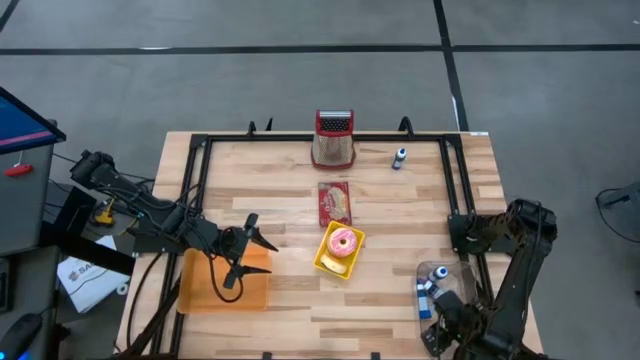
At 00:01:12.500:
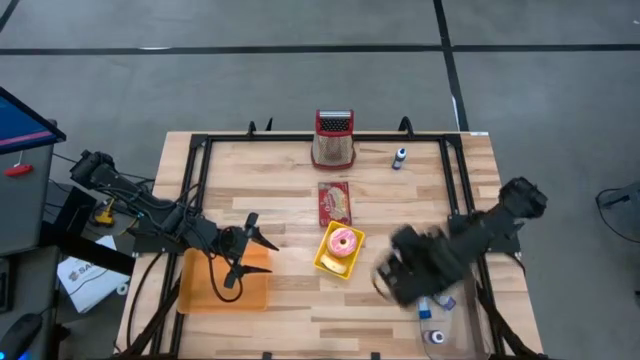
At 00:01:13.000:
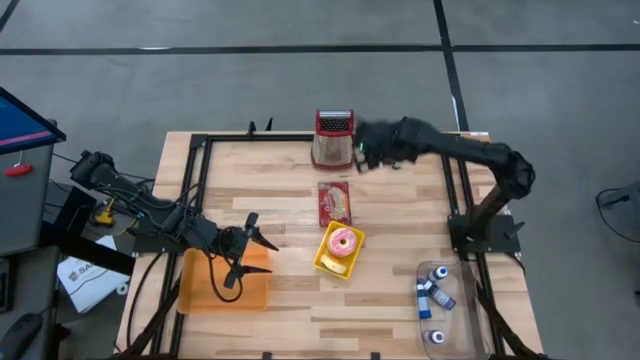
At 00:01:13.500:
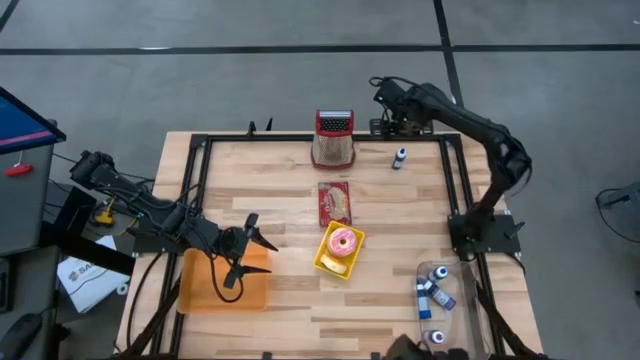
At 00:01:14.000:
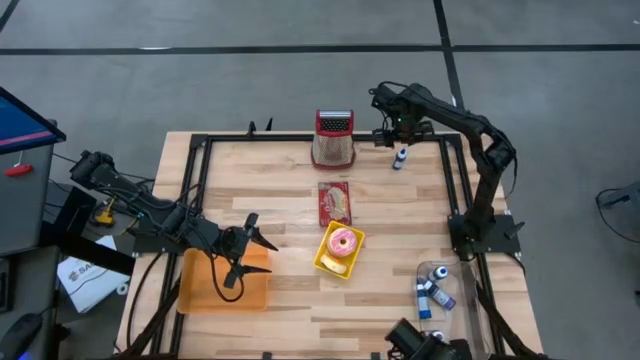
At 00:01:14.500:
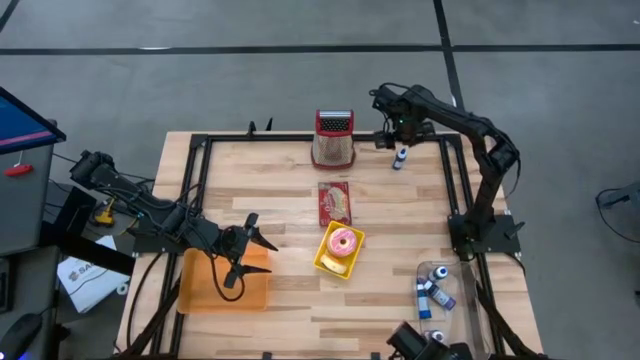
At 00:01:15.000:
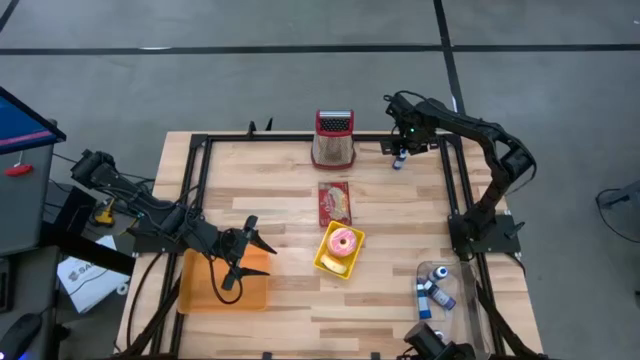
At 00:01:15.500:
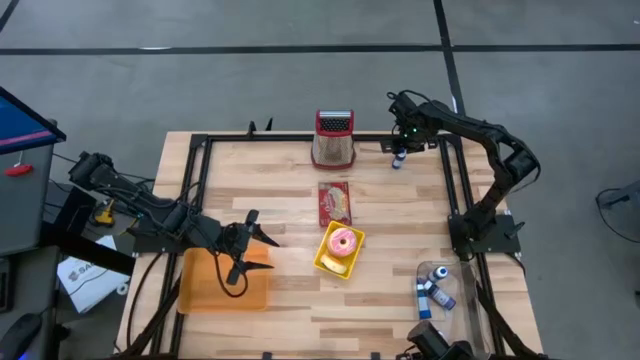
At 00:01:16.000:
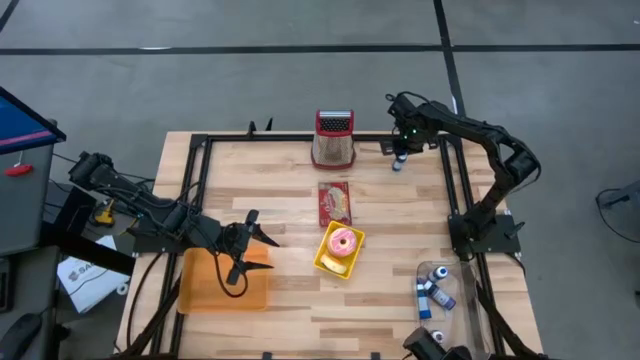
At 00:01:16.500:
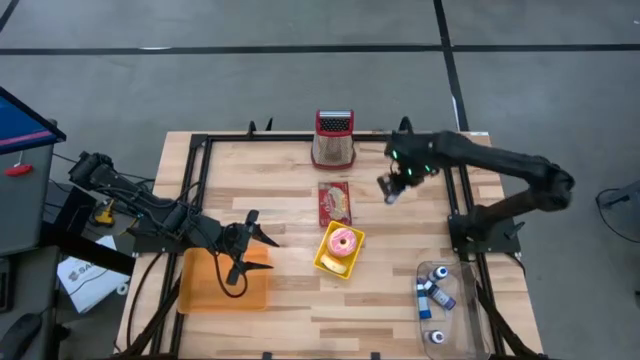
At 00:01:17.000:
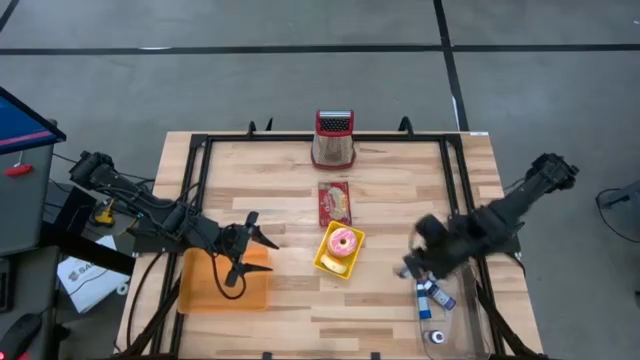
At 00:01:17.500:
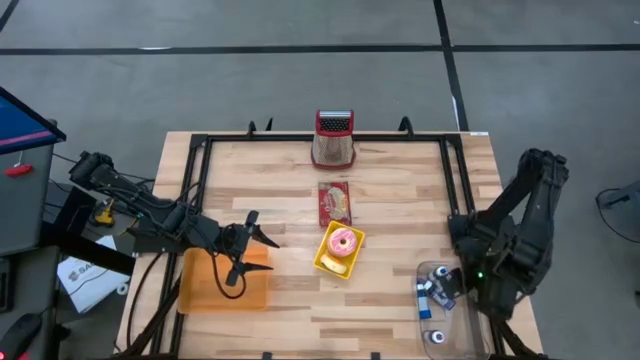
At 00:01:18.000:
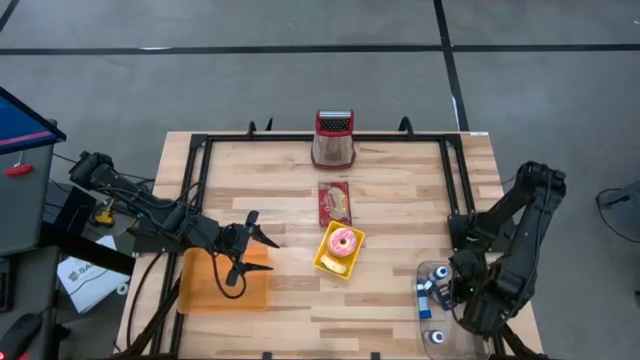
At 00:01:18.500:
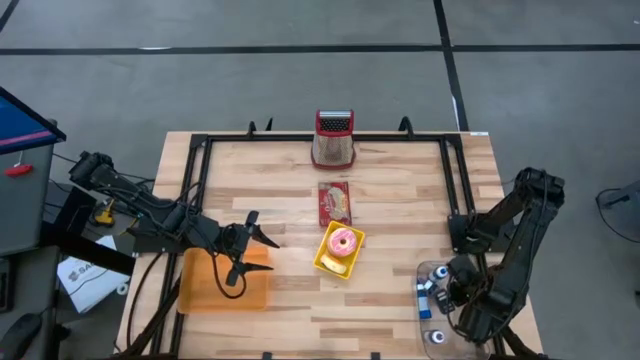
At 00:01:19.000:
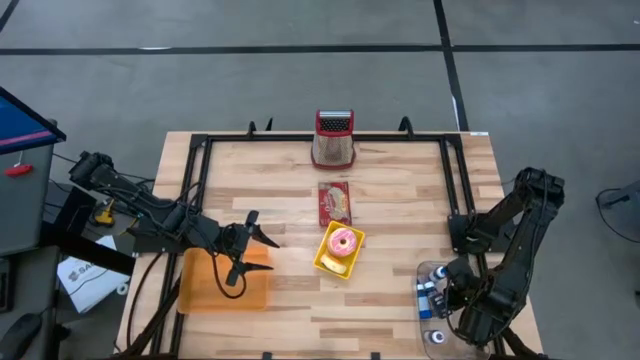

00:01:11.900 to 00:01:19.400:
Put the blue food coloring bottle into the transparent bin

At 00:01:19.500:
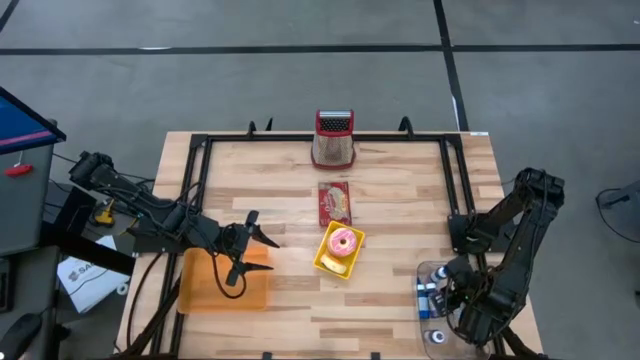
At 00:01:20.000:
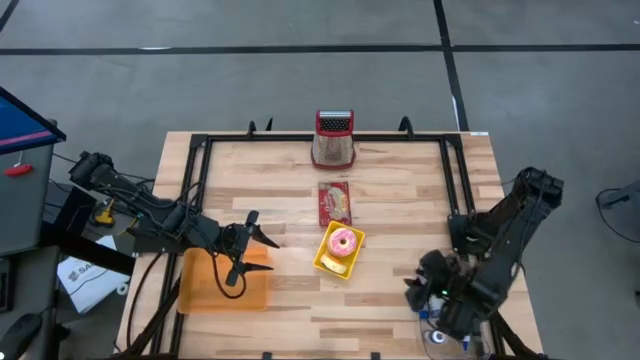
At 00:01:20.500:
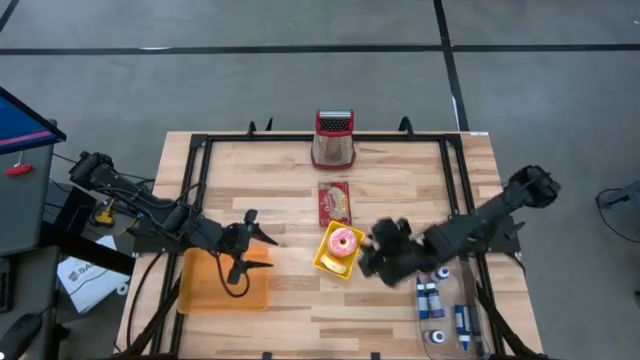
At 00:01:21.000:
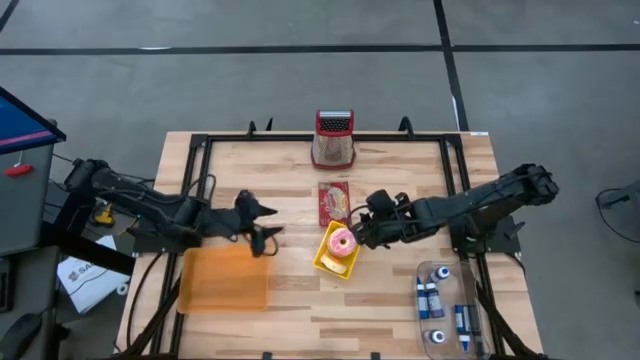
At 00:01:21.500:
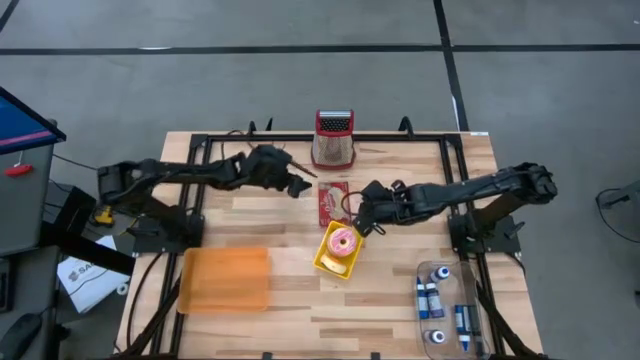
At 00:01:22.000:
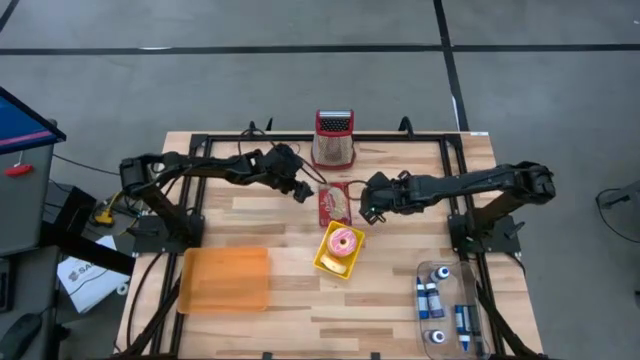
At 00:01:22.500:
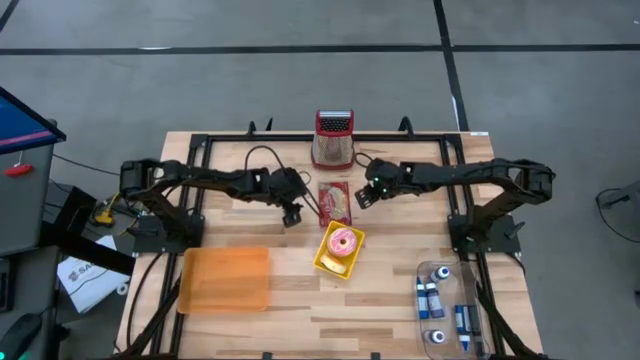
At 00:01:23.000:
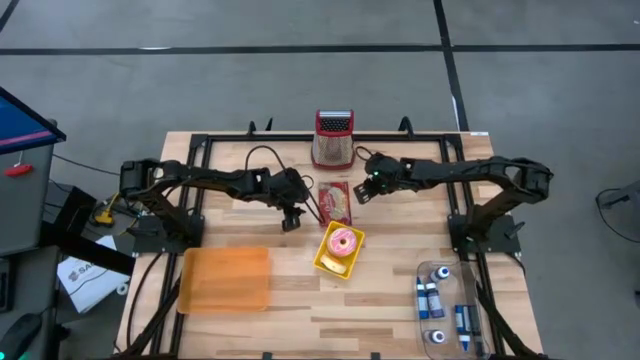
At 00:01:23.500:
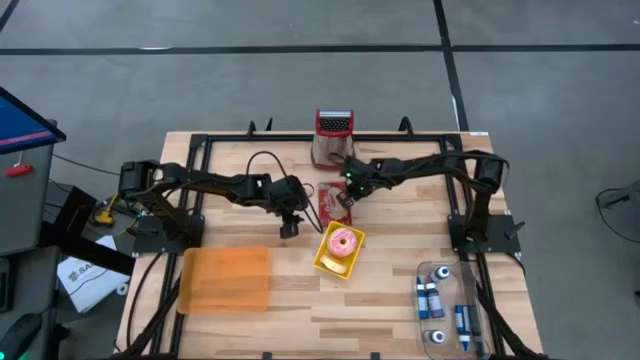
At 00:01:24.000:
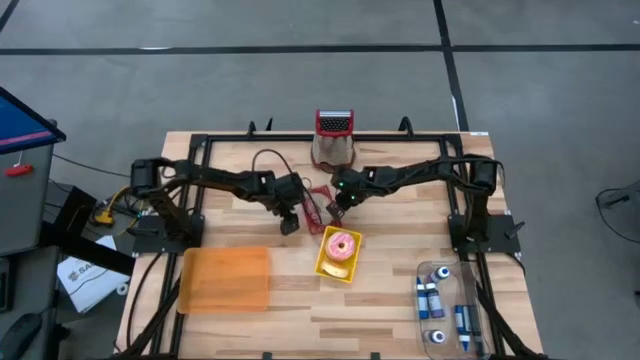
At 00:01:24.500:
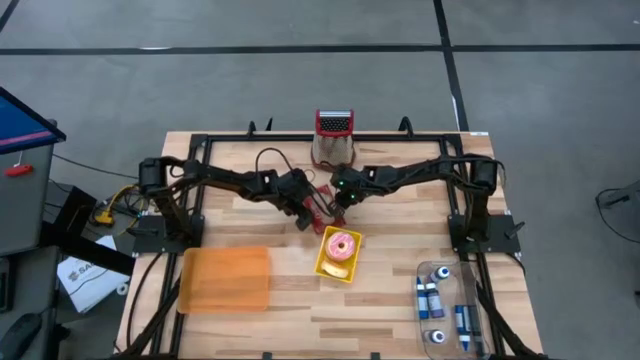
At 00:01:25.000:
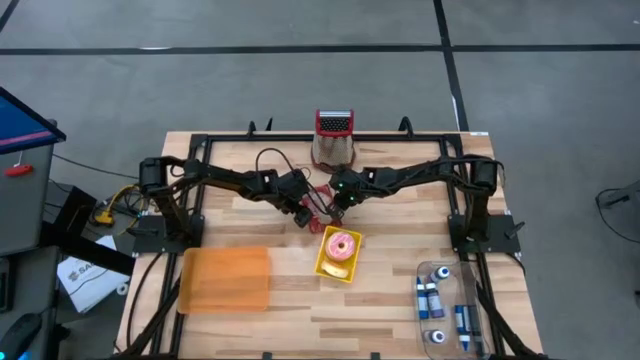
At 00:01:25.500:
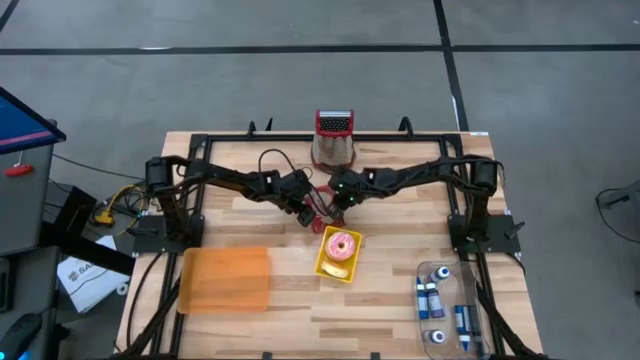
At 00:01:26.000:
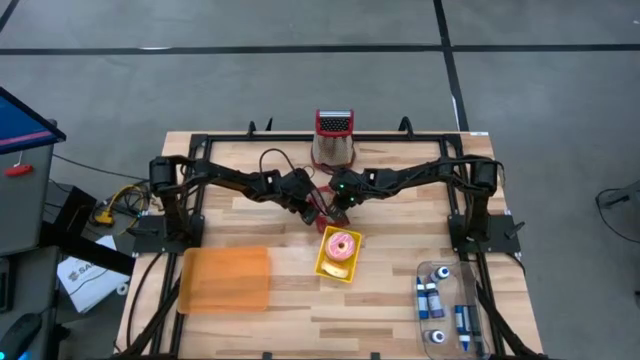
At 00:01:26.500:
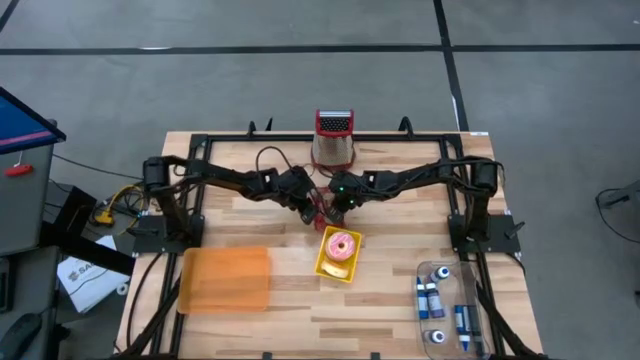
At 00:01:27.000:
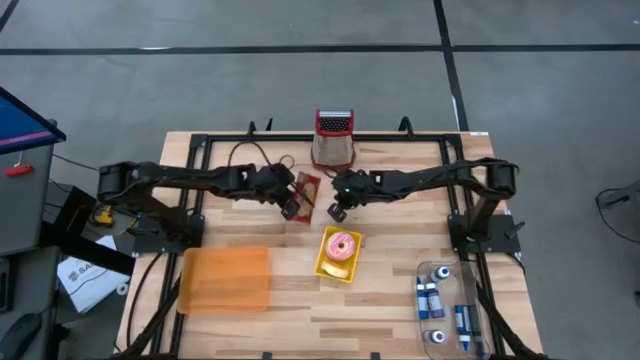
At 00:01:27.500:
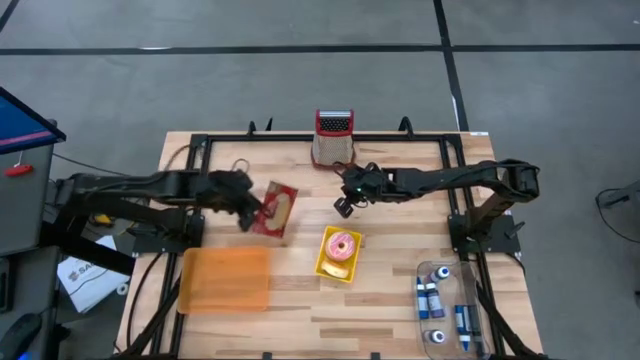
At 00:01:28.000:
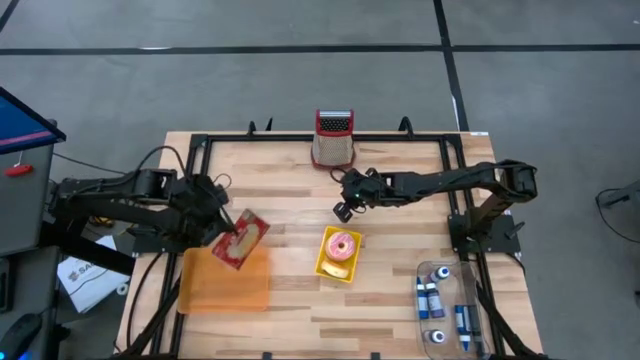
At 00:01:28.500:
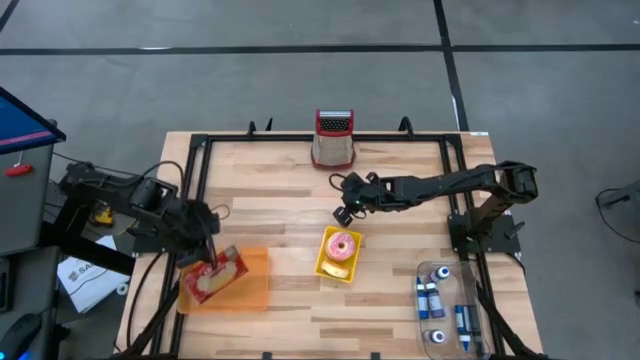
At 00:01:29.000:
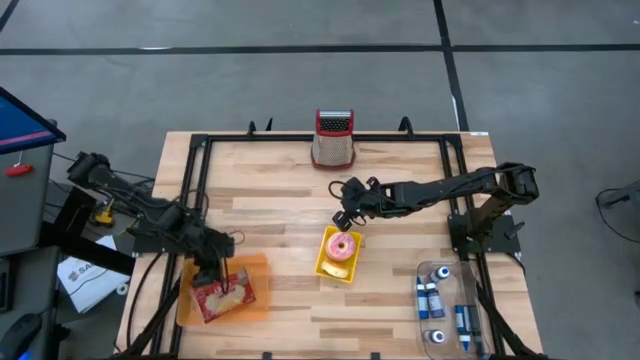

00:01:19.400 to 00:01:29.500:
Put the red popcorn bag into the orange bin
